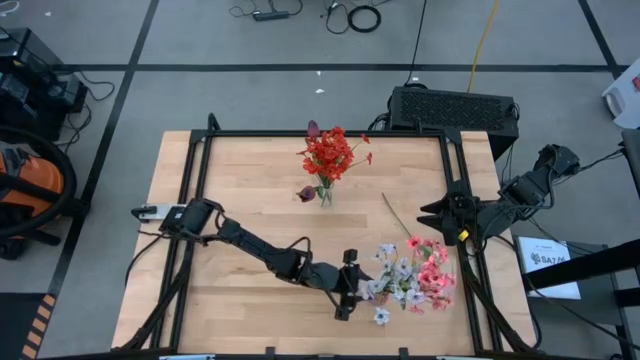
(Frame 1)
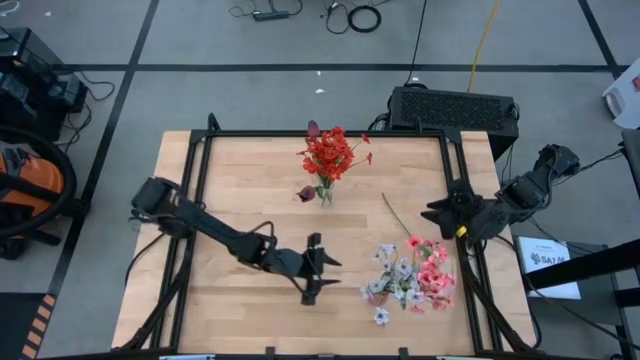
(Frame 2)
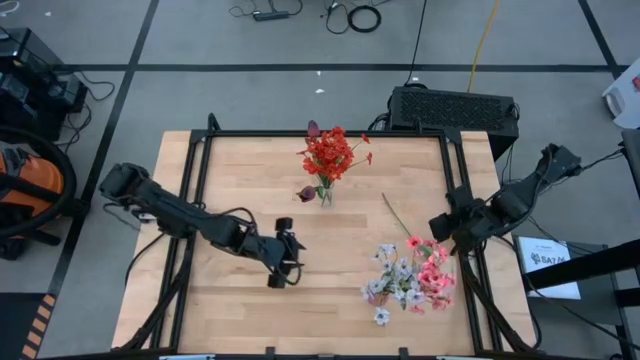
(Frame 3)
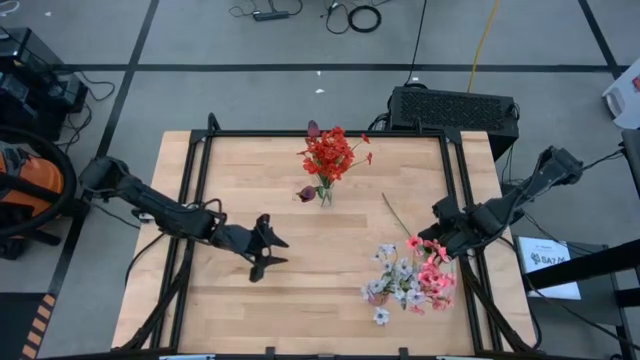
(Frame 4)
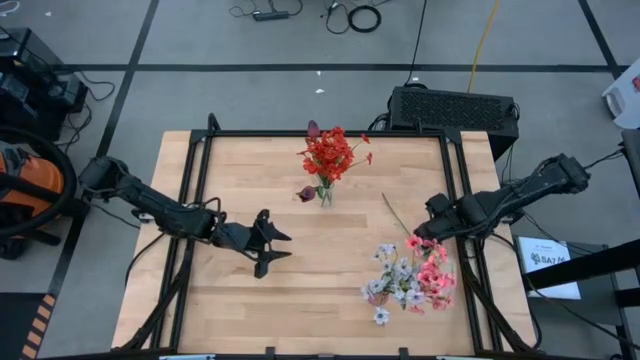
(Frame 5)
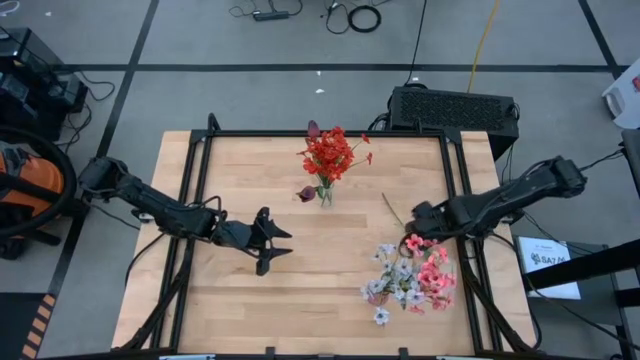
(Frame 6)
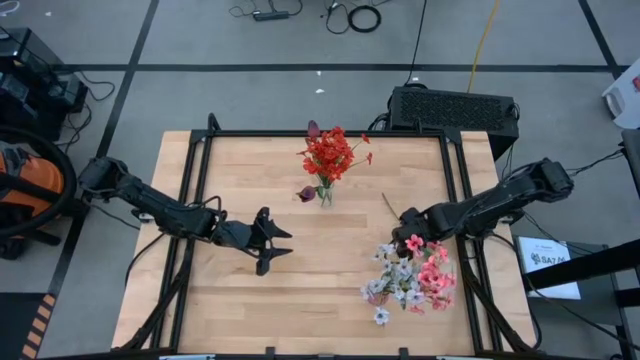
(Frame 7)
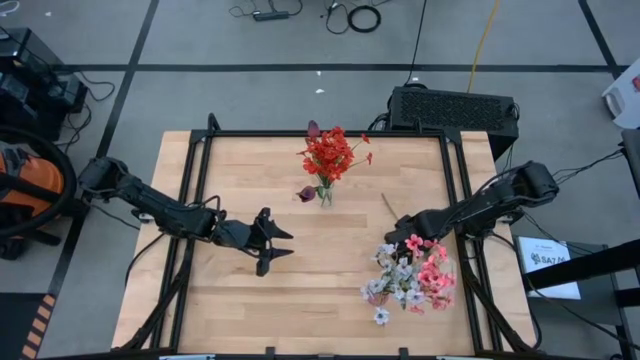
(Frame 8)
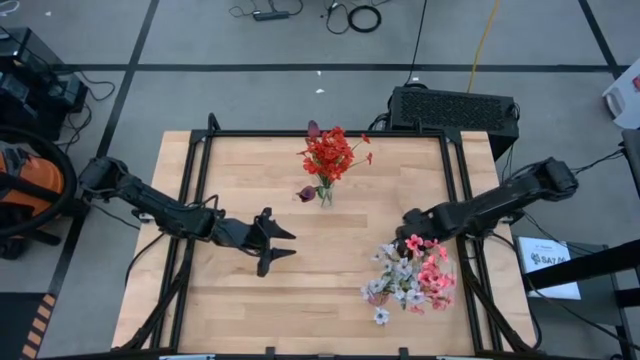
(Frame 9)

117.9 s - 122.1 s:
Task: Sort flowers into vase by color
Put the white flower into the purple vase

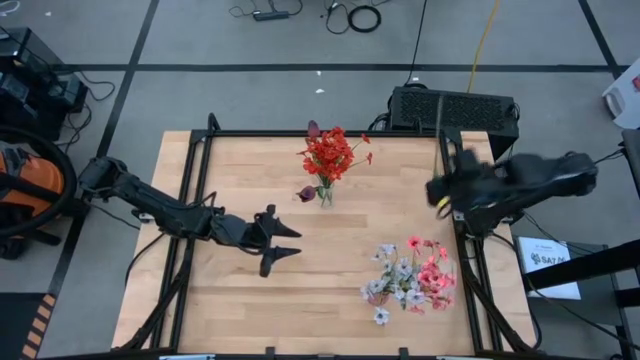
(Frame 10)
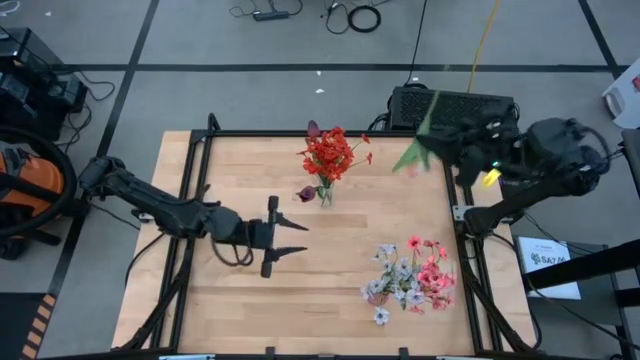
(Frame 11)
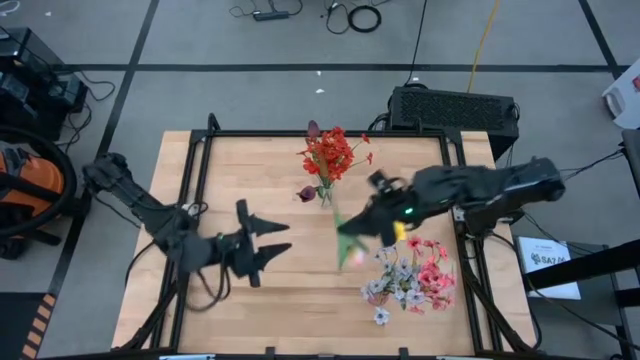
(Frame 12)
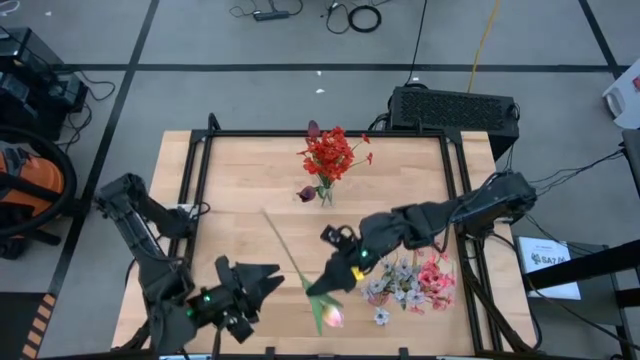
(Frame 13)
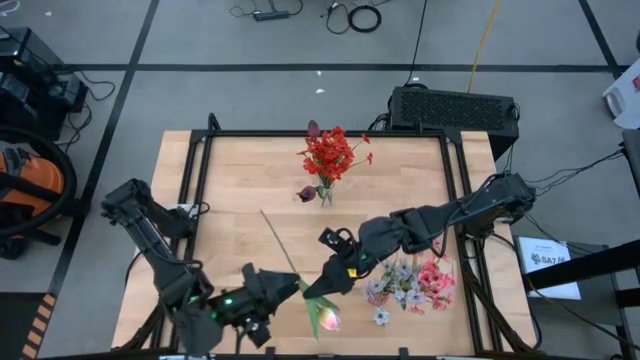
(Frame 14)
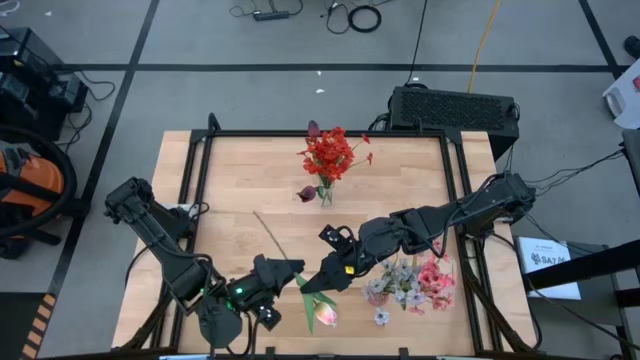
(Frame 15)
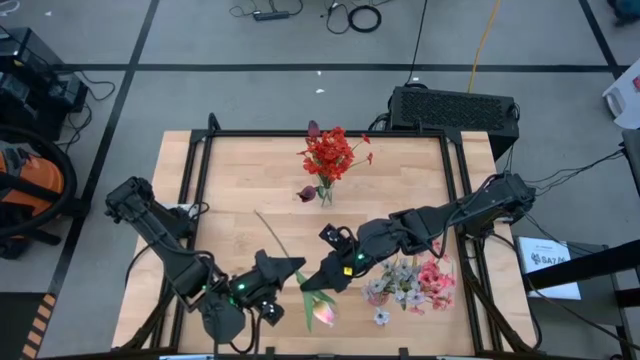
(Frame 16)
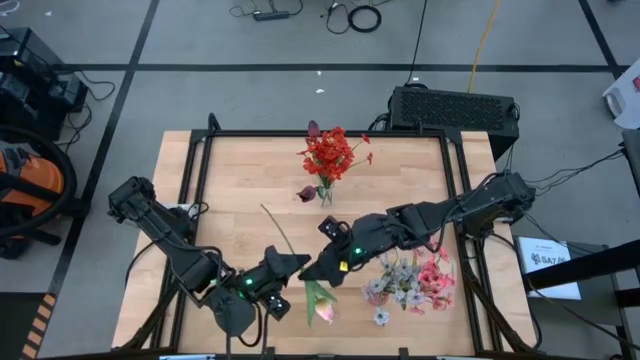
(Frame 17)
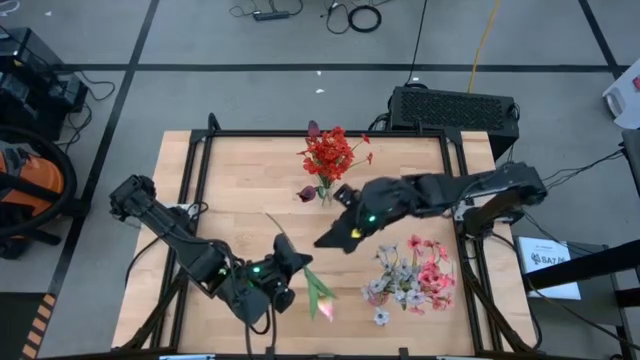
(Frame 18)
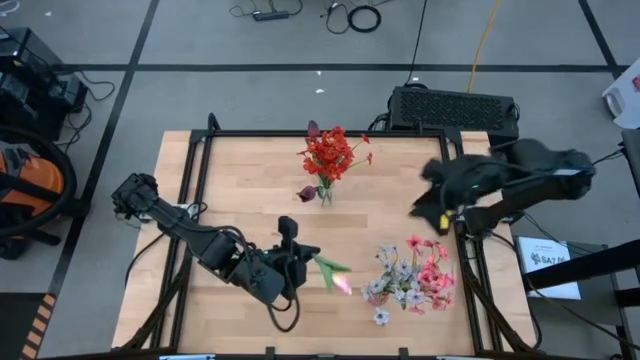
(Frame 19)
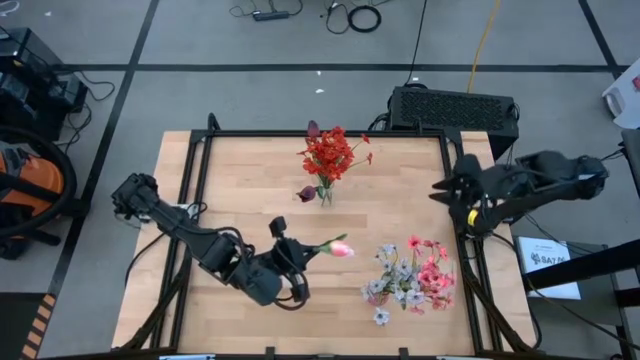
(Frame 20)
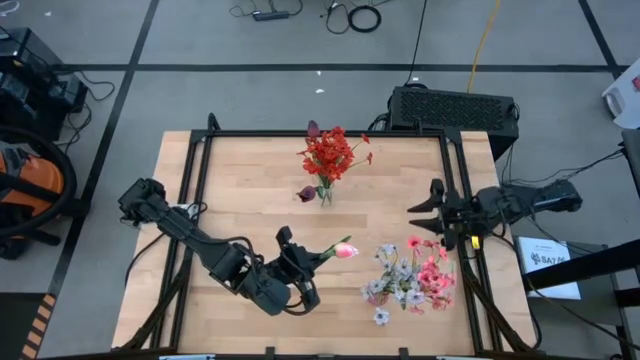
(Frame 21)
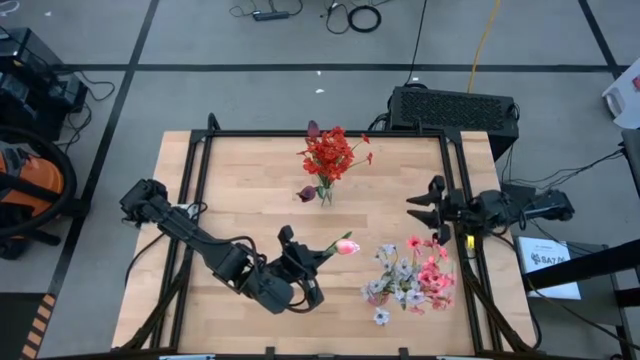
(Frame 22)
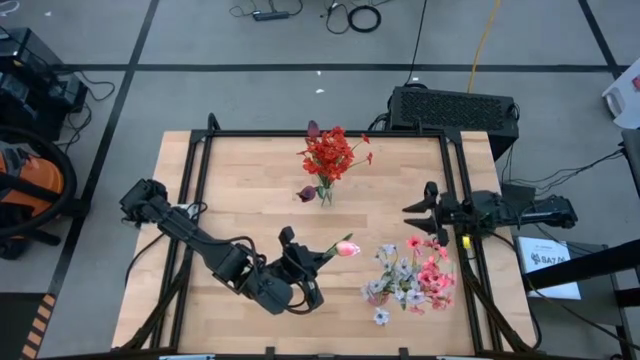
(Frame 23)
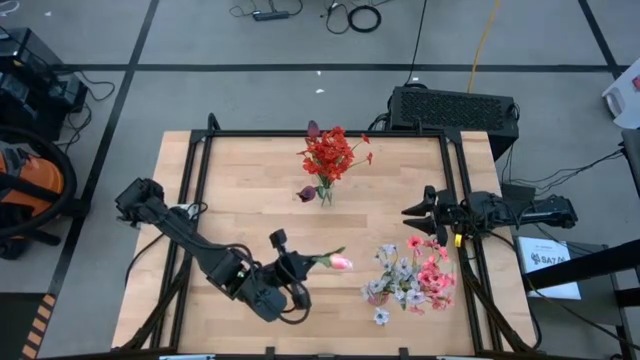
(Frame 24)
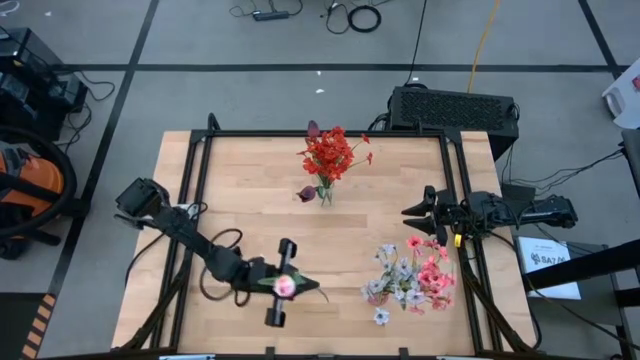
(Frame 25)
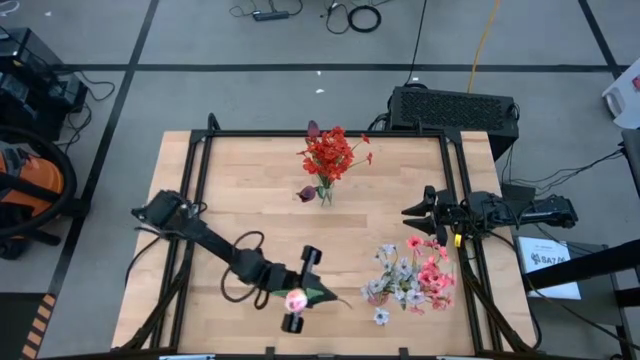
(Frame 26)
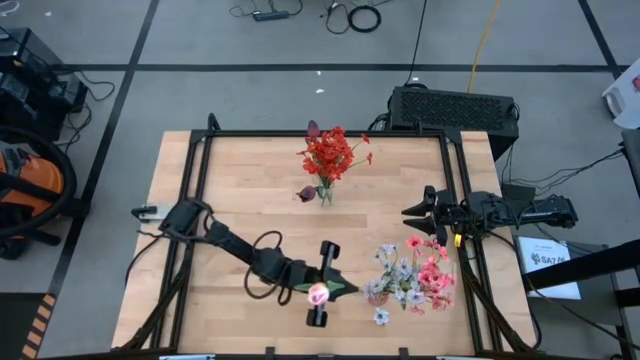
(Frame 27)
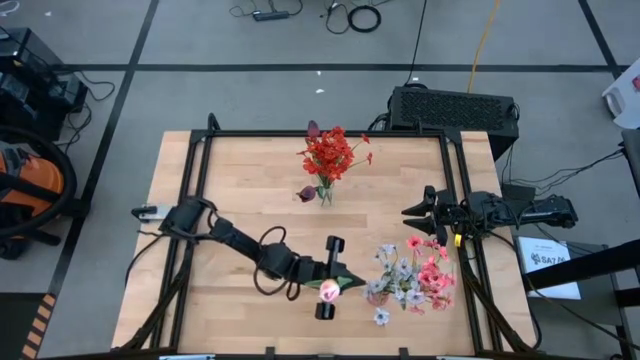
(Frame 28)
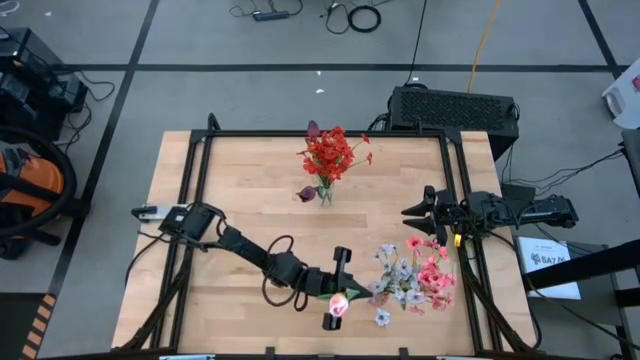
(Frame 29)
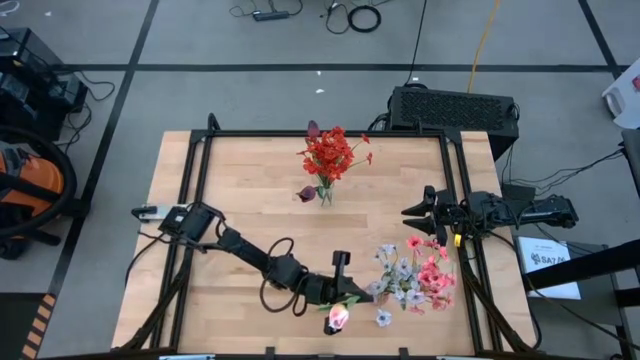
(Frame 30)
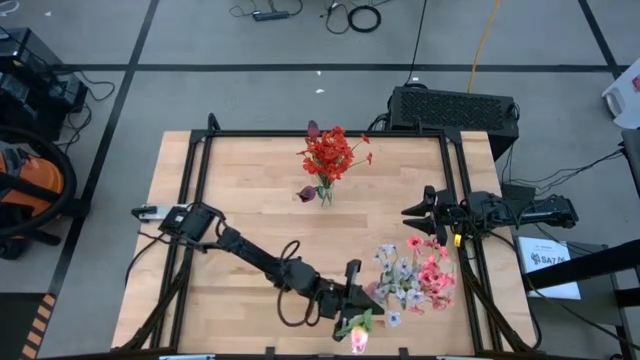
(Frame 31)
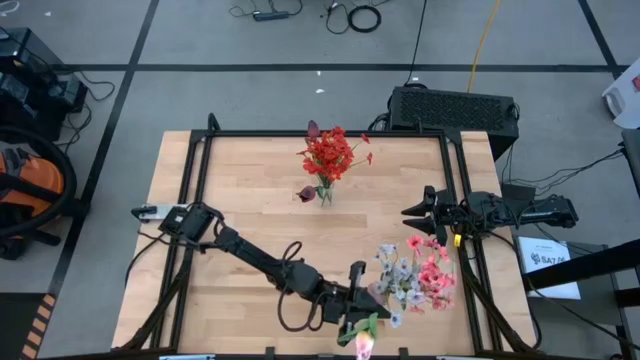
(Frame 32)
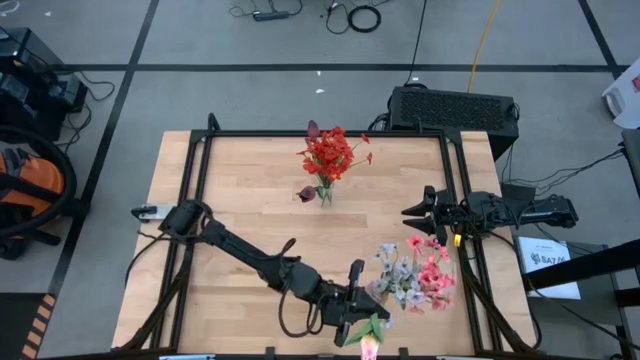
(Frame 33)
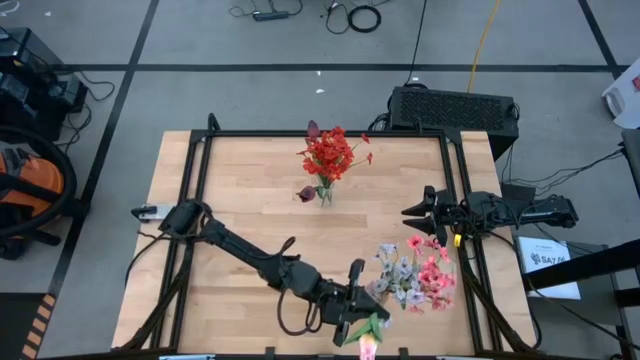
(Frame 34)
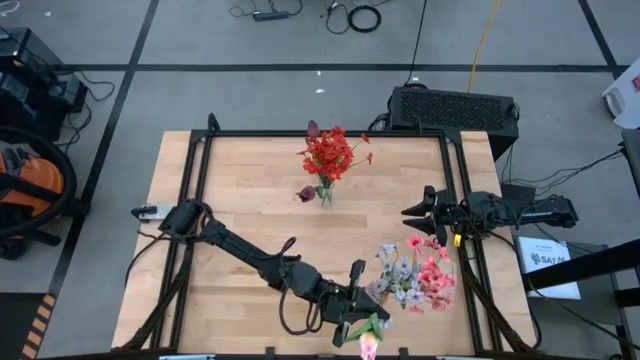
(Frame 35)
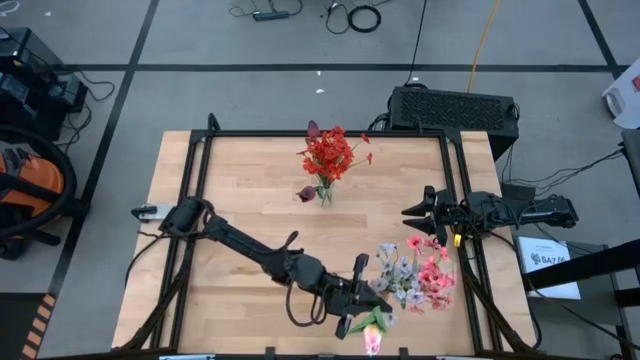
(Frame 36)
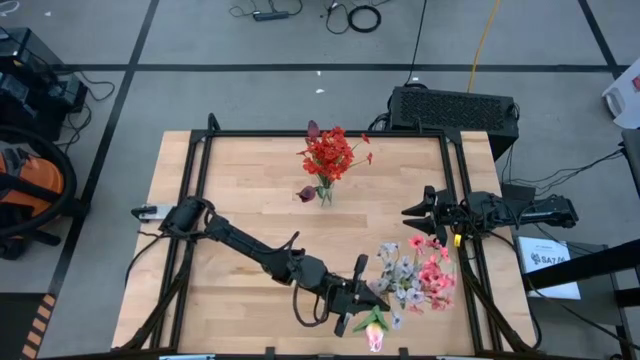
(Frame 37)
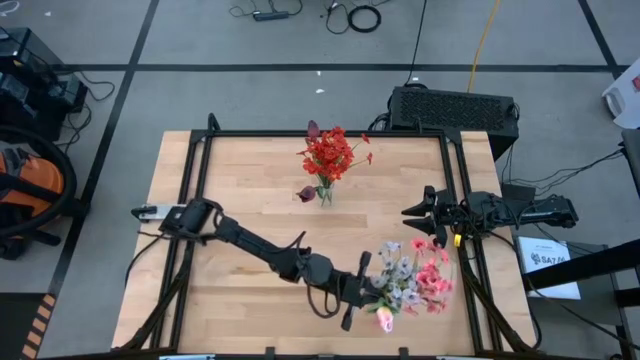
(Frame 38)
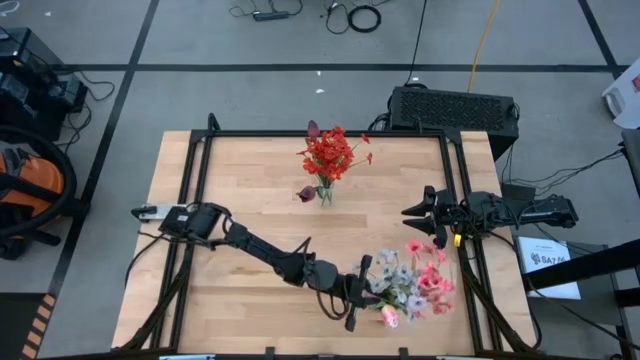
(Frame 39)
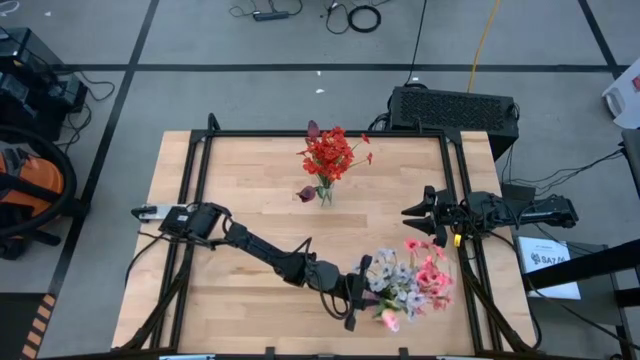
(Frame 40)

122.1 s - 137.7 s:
Put the pink flower into the purple vase

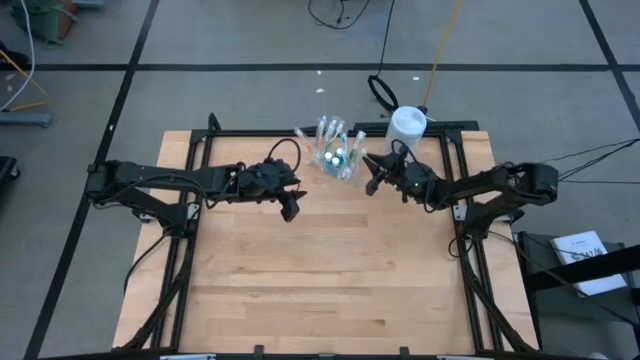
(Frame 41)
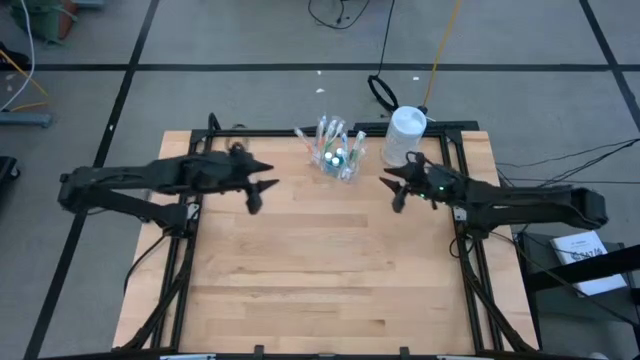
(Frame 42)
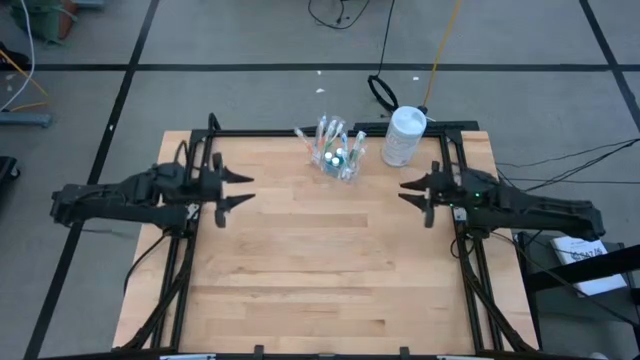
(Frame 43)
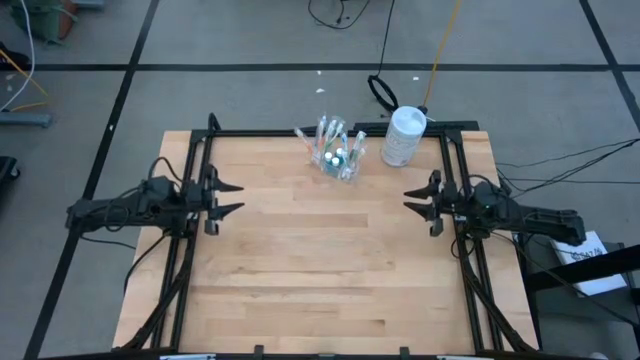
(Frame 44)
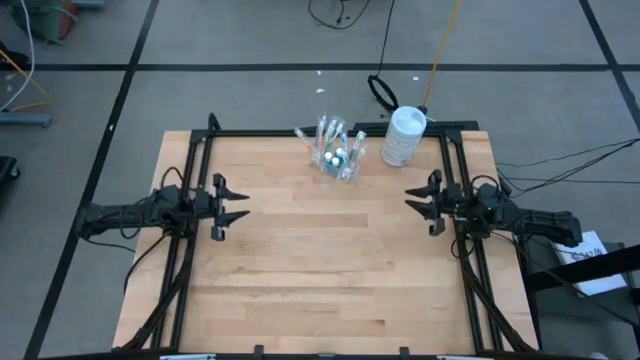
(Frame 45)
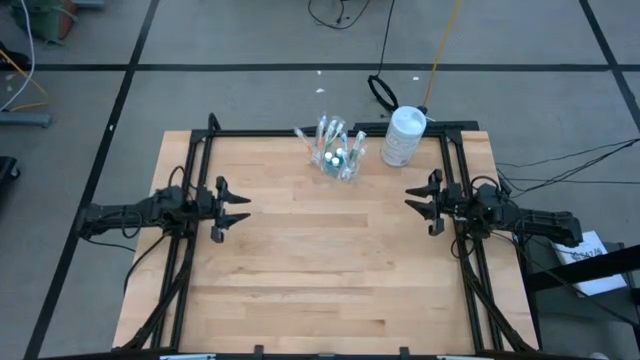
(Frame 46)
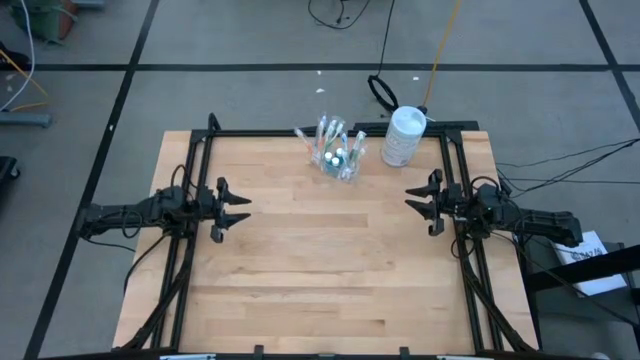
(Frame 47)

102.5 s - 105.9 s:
Task: Pick & Place toothbrushing station
Return to Home Position
